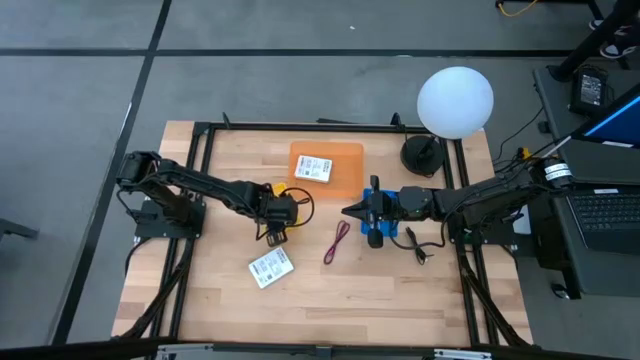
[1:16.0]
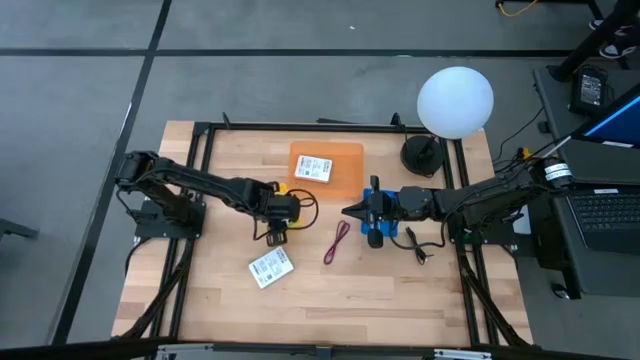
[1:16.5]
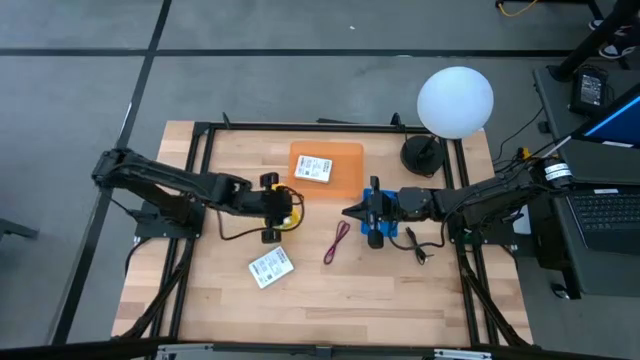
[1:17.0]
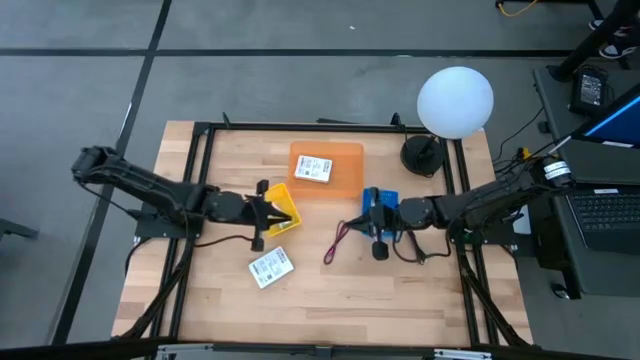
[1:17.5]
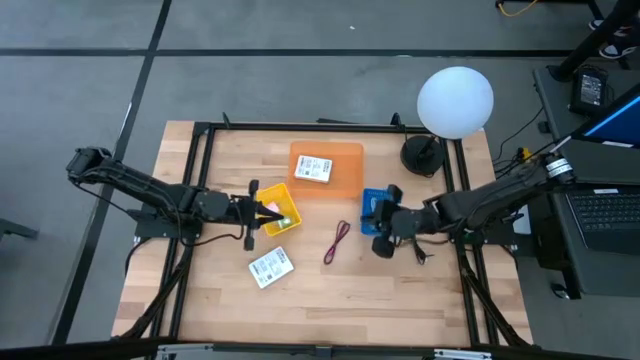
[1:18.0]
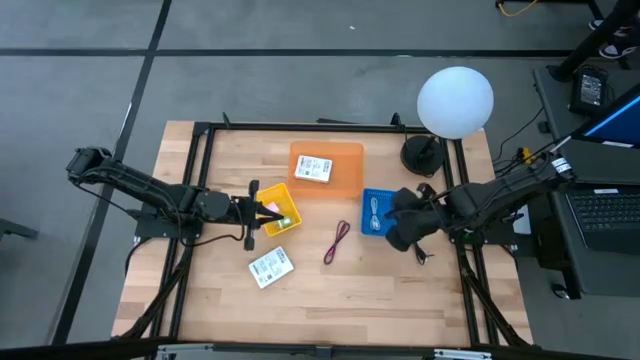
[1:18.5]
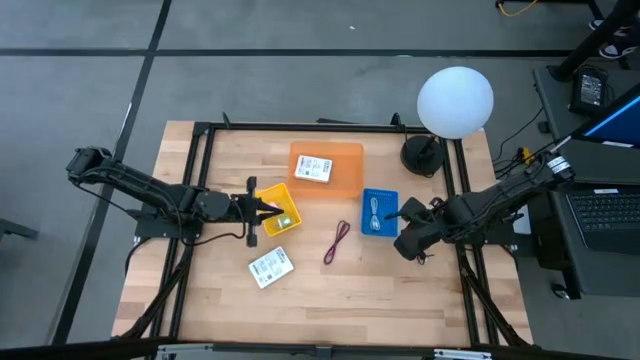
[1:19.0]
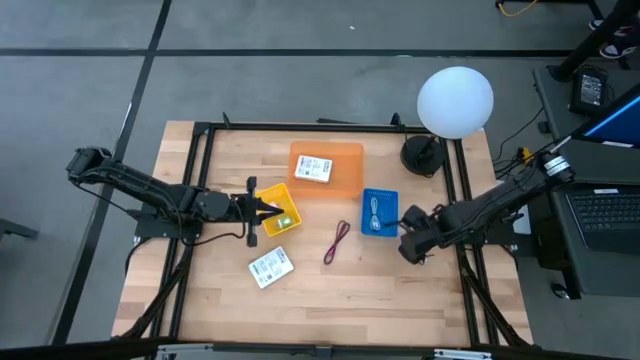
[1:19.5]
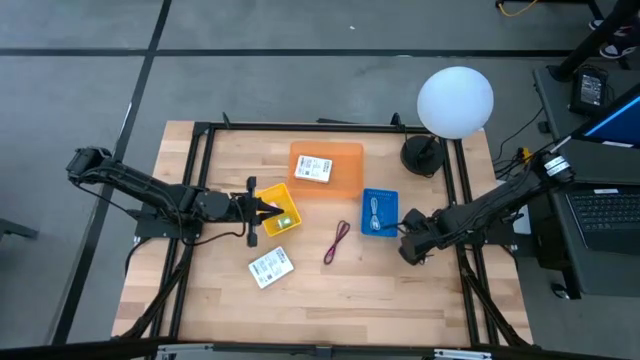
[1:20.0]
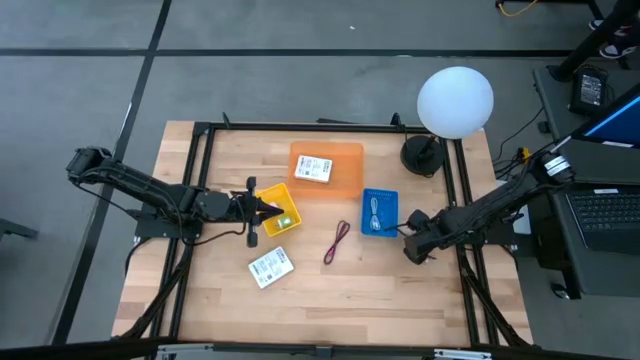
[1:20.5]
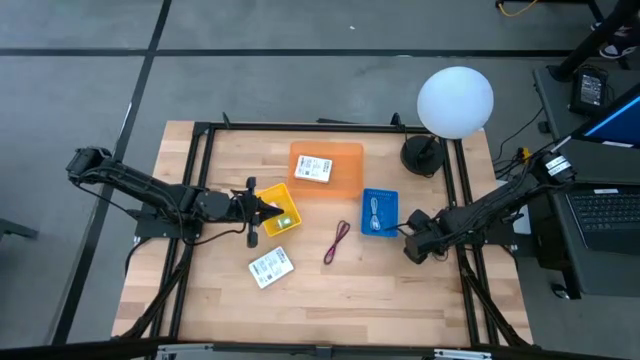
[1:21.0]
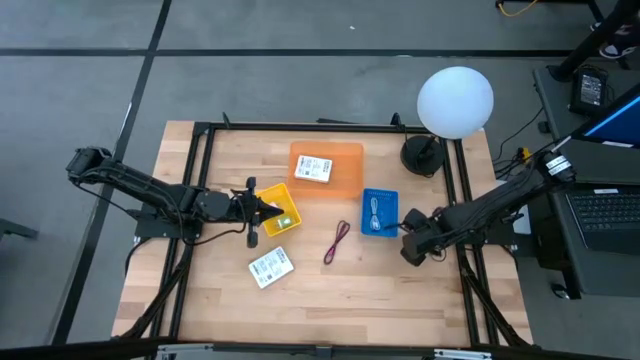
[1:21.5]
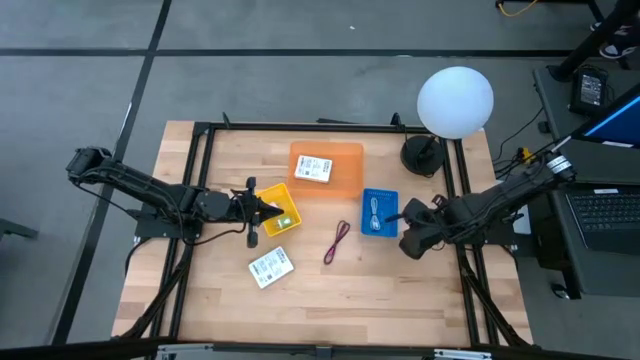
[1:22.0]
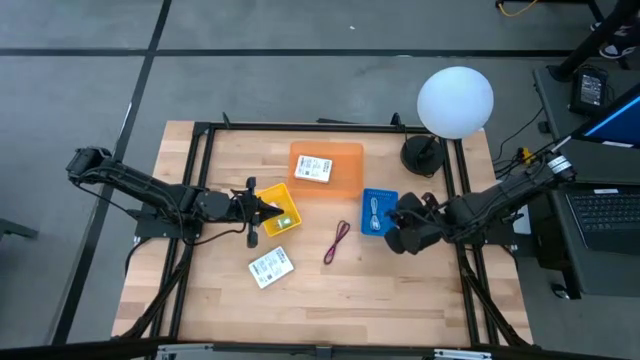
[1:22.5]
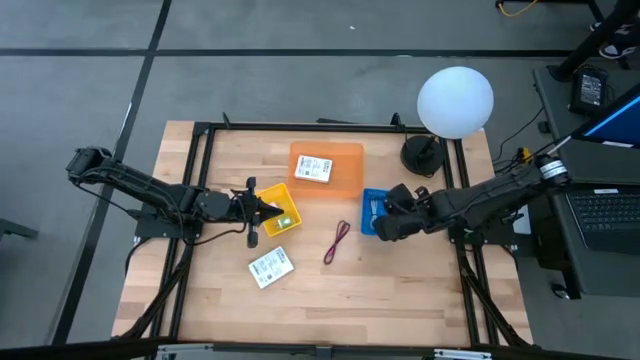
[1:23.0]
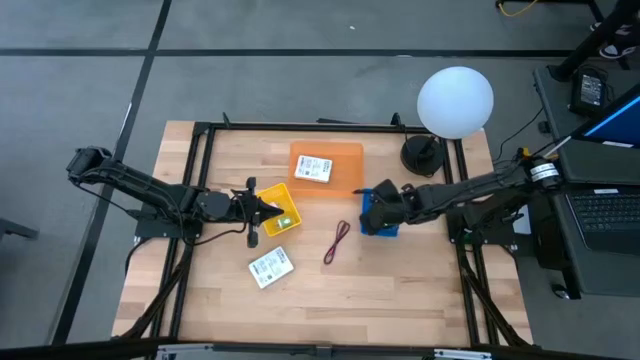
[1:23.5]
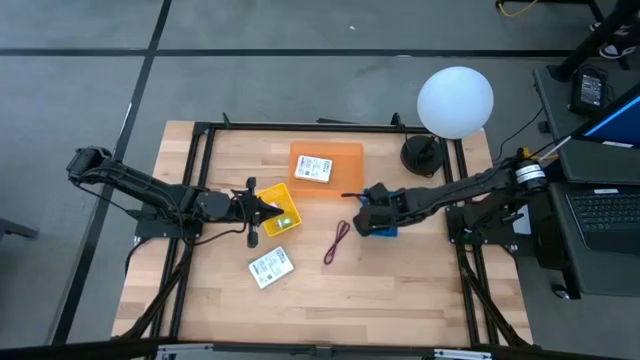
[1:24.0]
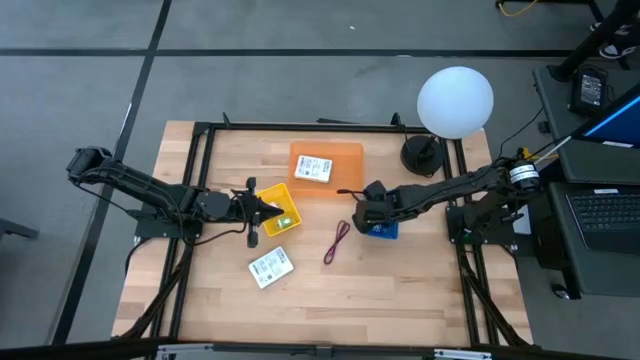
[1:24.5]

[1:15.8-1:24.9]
Task: Pick and place items into bin
Put the black charger cable into the blue bin

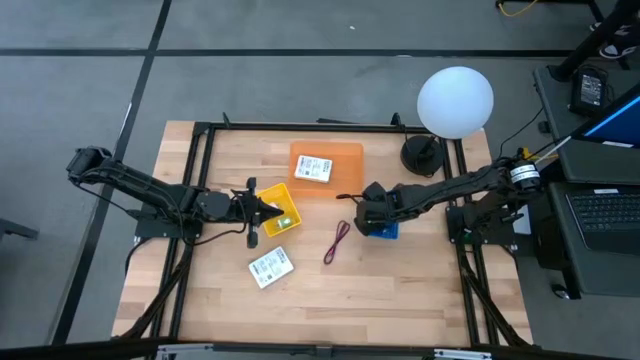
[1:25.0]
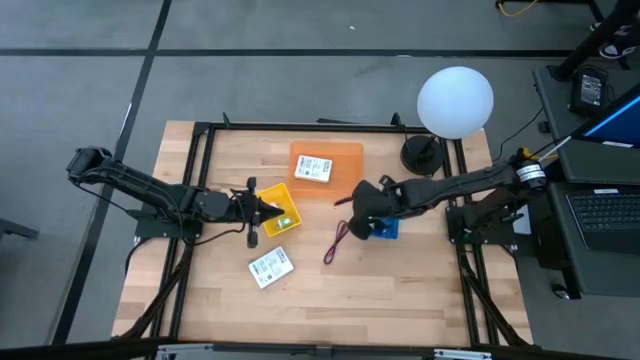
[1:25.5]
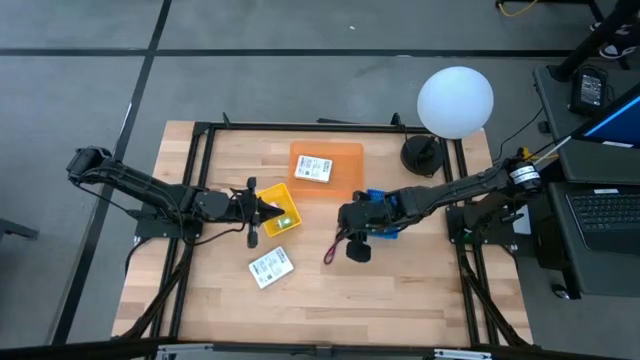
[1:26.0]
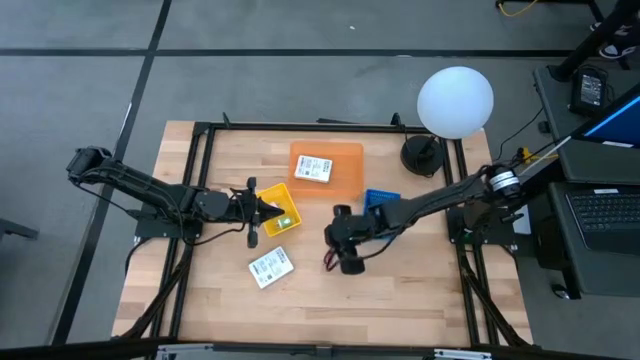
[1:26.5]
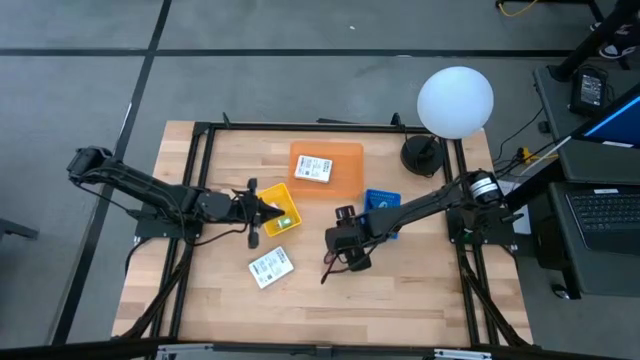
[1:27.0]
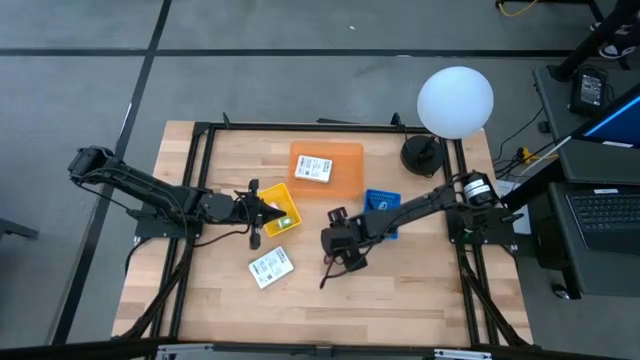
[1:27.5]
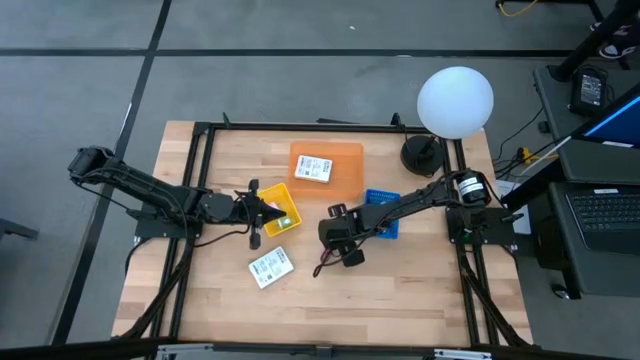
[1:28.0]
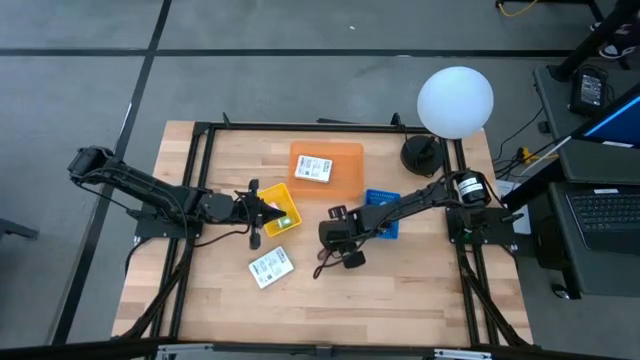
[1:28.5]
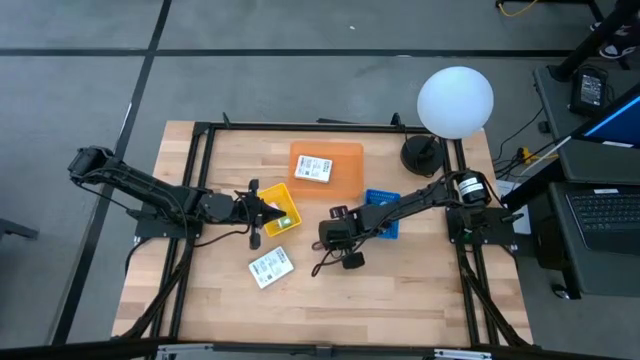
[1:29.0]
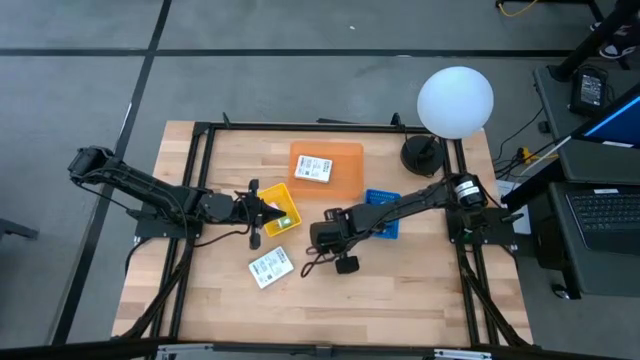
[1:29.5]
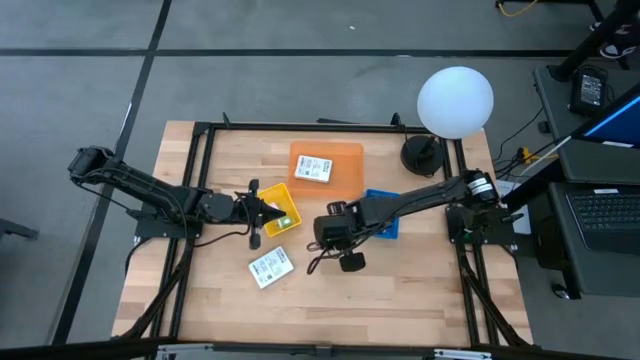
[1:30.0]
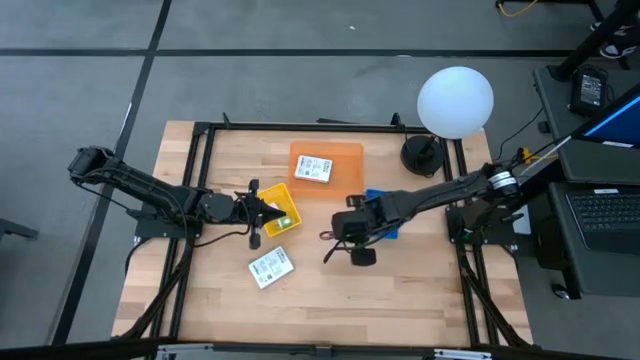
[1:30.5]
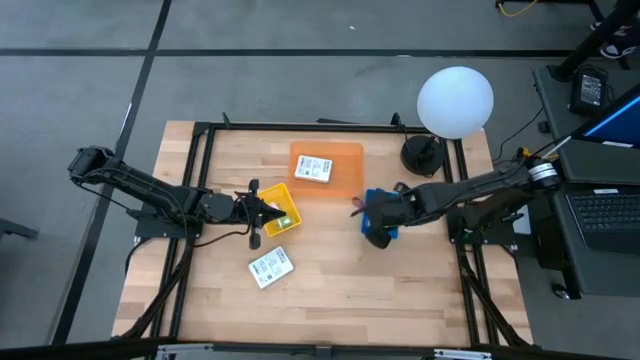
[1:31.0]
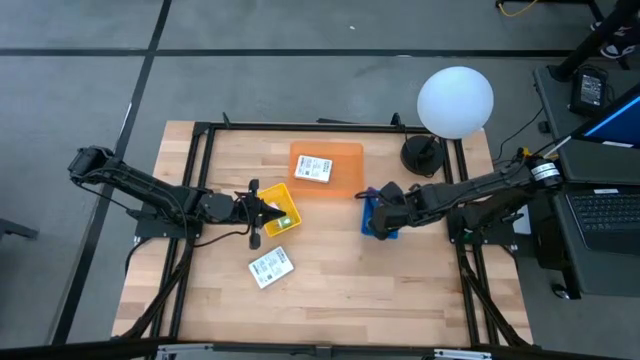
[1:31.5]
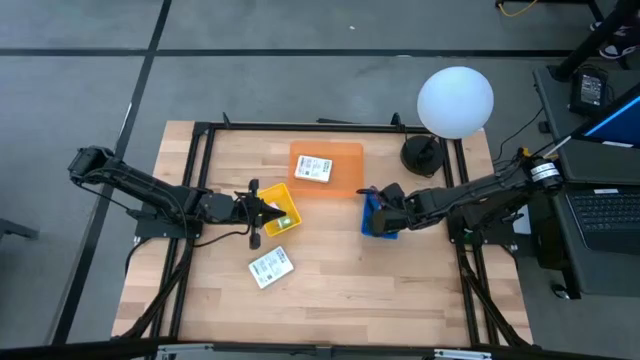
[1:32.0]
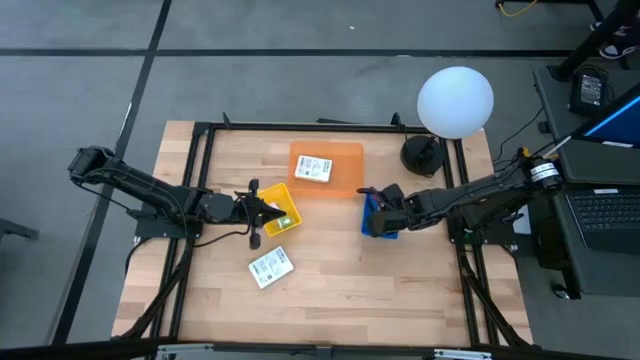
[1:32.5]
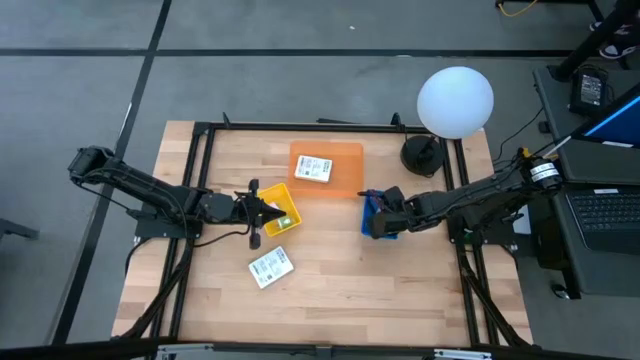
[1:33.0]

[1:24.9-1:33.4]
Put the pink charger cable into the blue bin

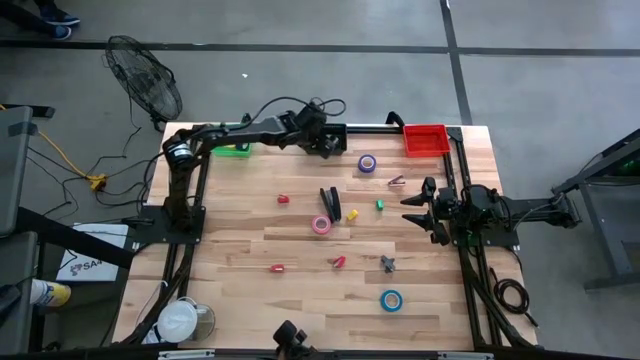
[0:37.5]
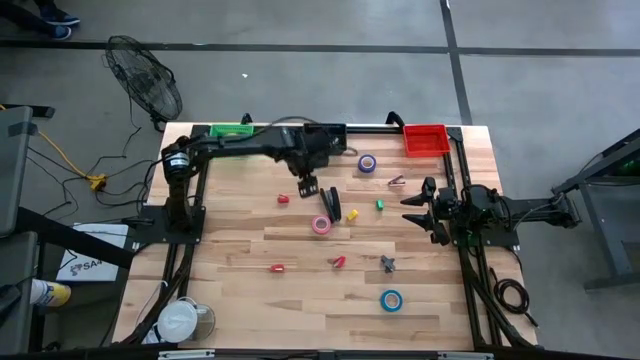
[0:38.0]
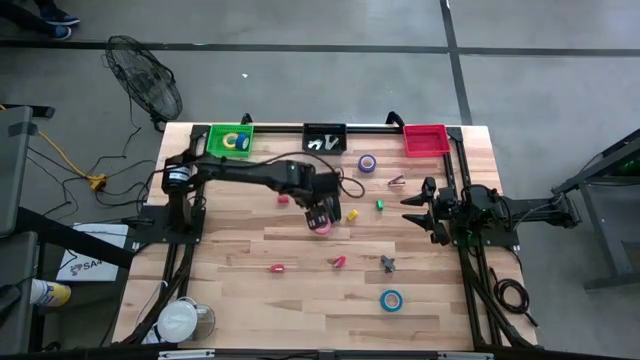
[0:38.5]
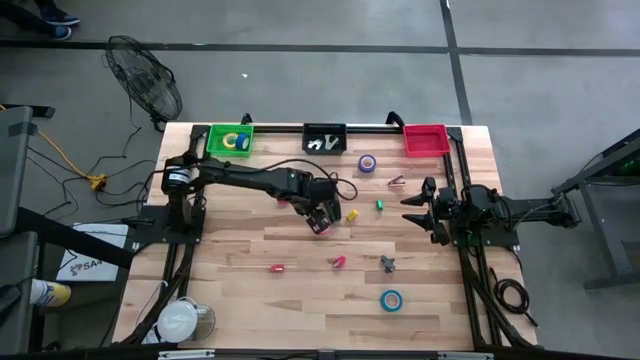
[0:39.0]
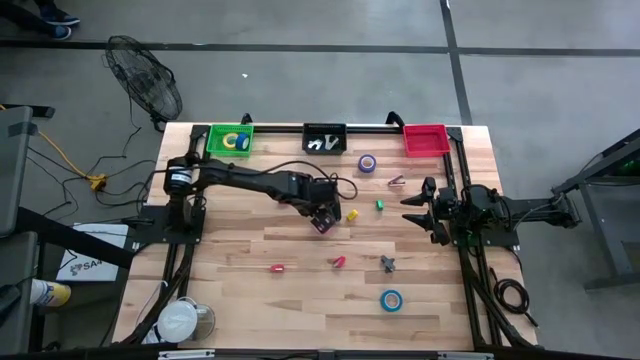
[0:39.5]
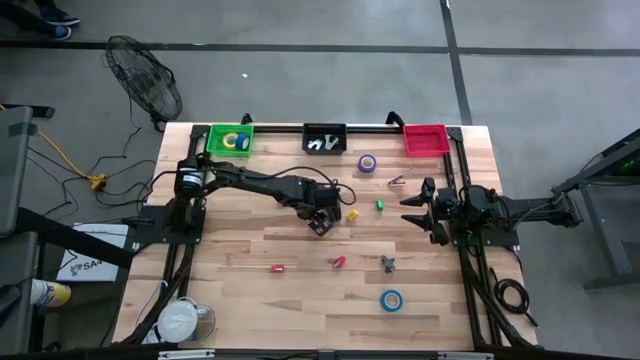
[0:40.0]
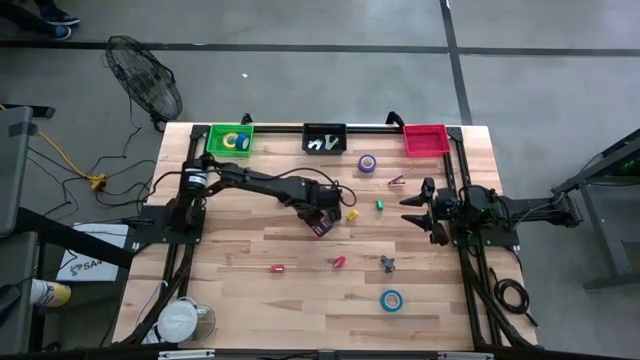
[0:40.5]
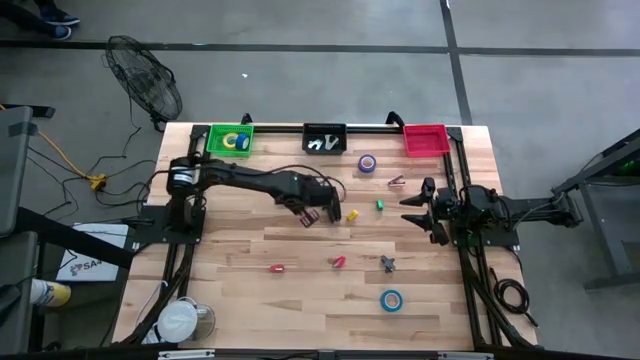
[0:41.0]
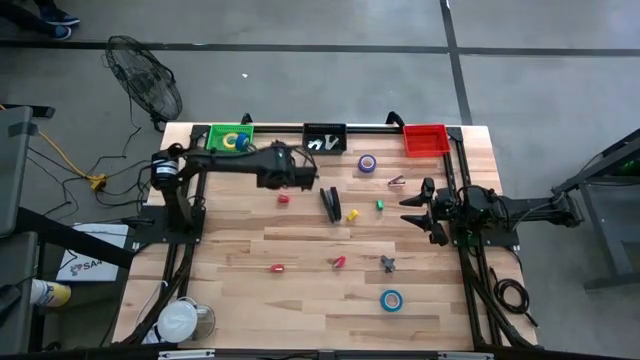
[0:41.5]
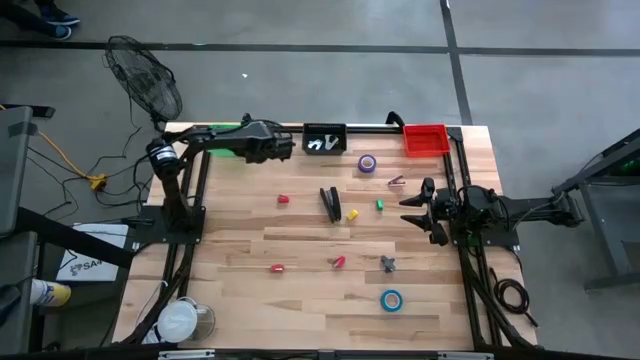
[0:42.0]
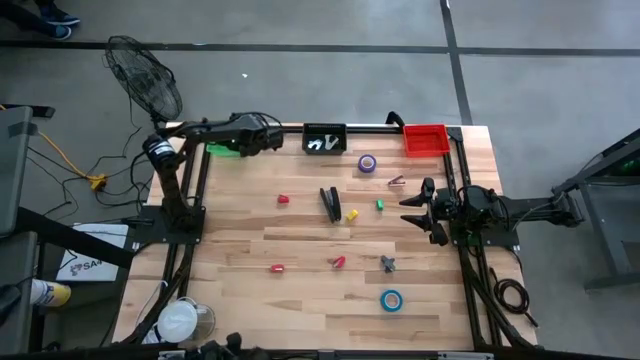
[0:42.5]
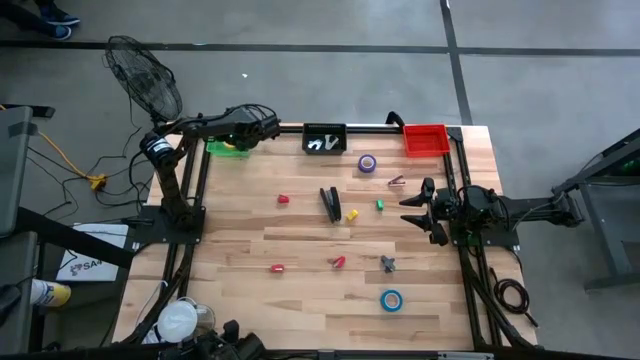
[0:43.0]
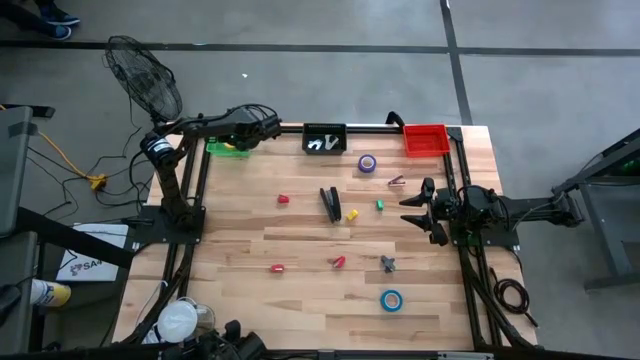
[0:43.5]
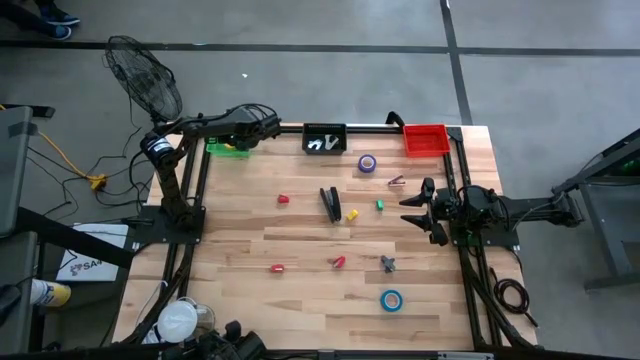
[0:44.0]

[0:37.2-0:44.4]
Task: Pick and place Stapler, Stapler remover, tape
Put the pink tape in the green bin
